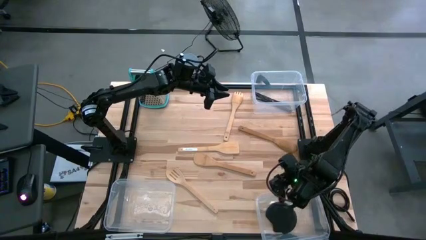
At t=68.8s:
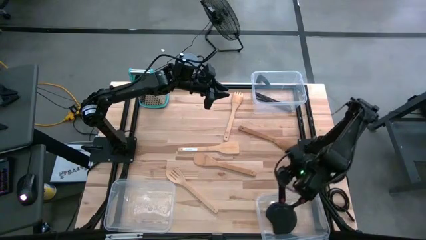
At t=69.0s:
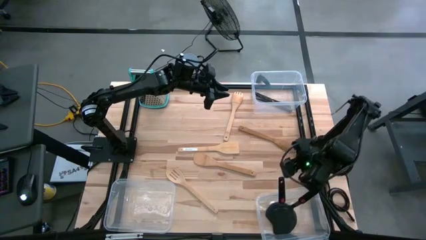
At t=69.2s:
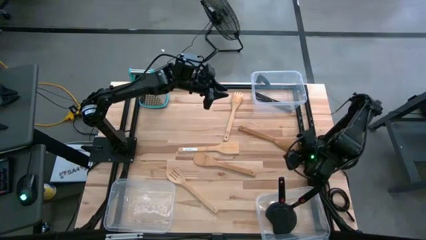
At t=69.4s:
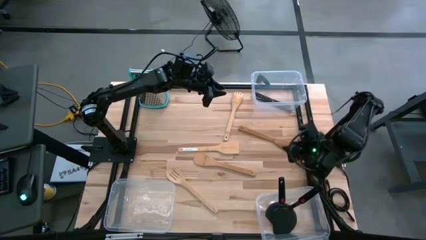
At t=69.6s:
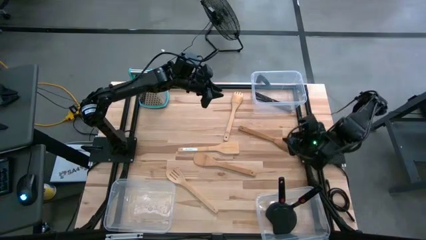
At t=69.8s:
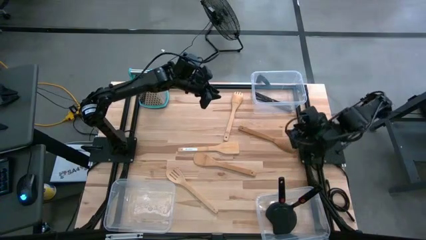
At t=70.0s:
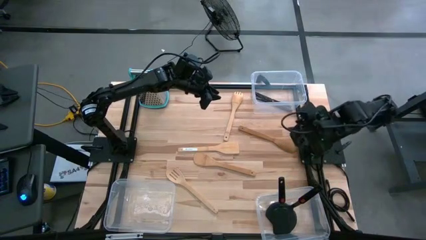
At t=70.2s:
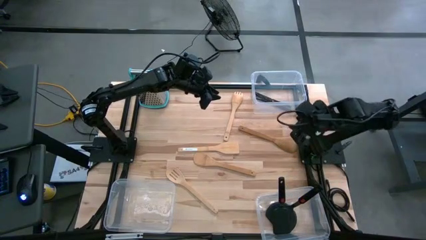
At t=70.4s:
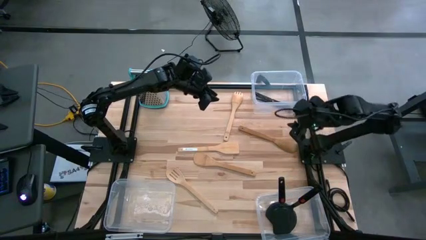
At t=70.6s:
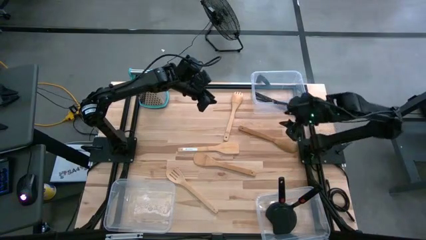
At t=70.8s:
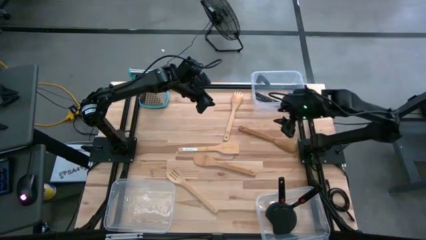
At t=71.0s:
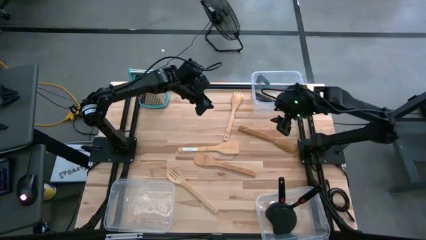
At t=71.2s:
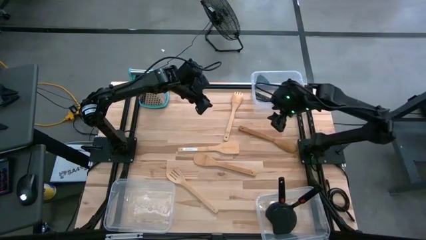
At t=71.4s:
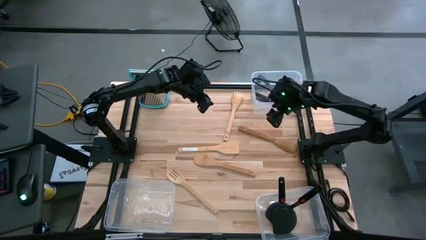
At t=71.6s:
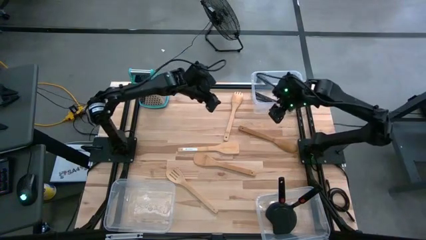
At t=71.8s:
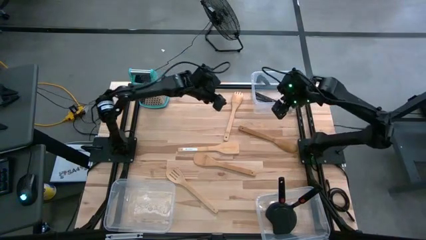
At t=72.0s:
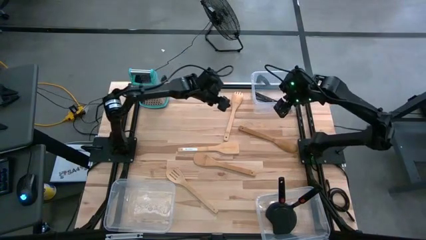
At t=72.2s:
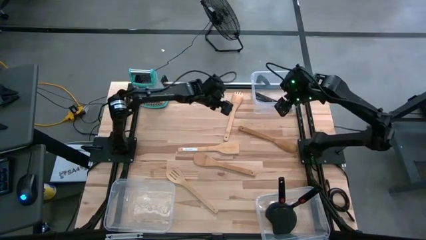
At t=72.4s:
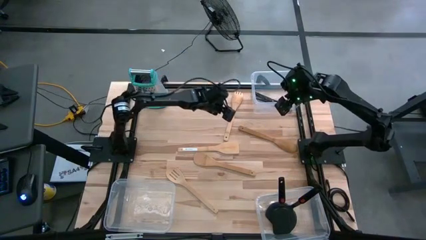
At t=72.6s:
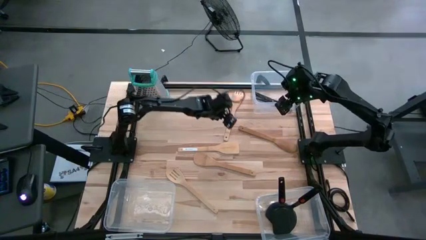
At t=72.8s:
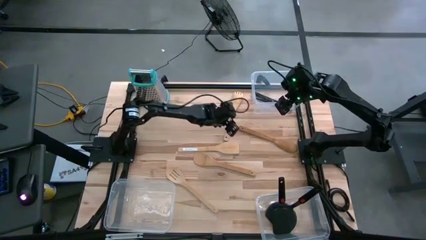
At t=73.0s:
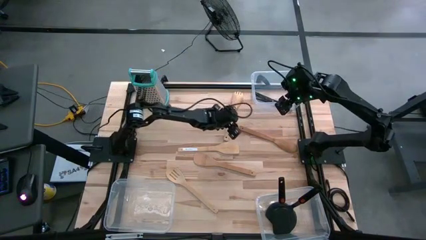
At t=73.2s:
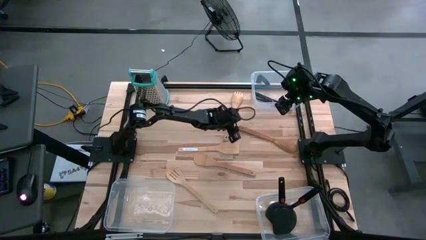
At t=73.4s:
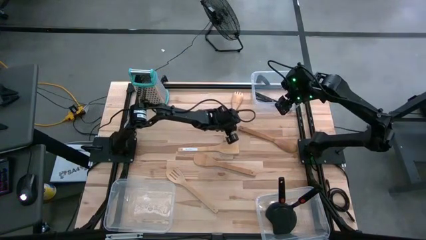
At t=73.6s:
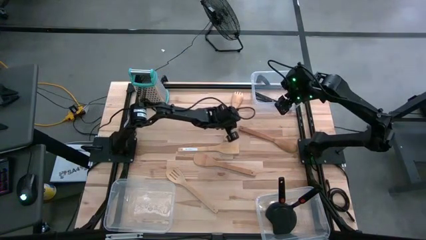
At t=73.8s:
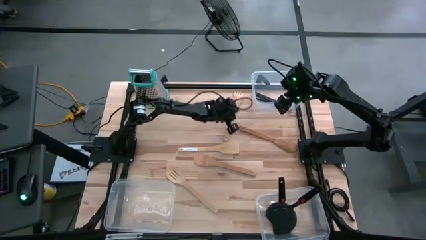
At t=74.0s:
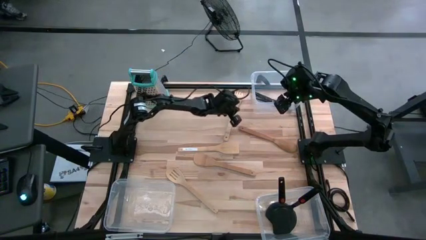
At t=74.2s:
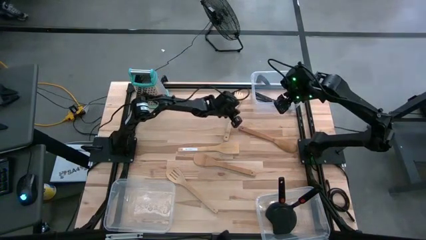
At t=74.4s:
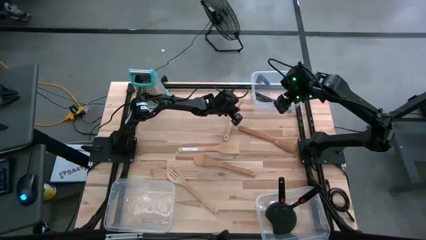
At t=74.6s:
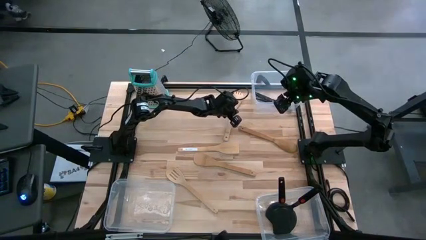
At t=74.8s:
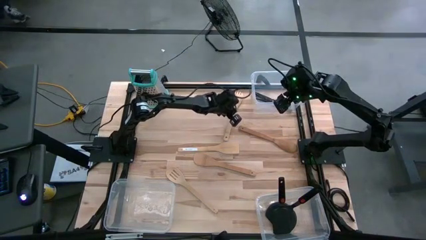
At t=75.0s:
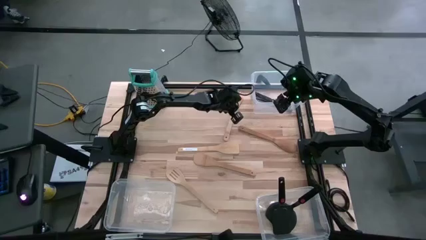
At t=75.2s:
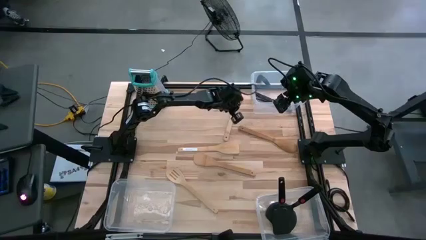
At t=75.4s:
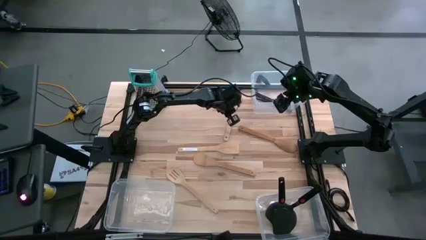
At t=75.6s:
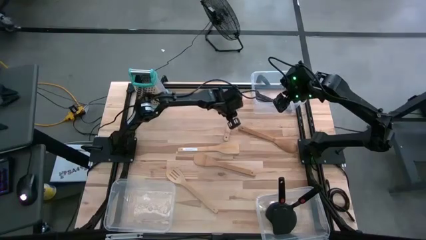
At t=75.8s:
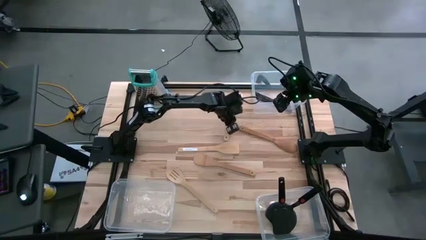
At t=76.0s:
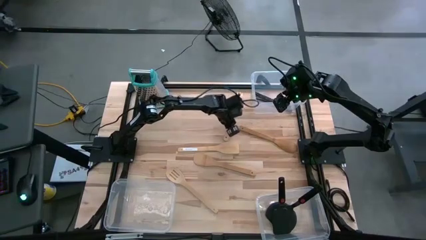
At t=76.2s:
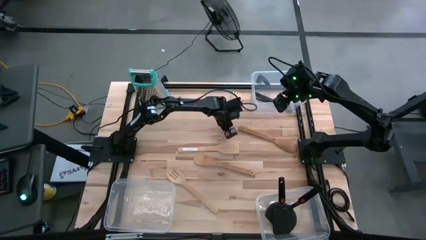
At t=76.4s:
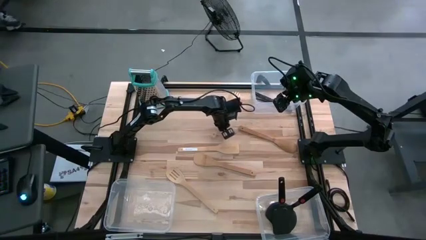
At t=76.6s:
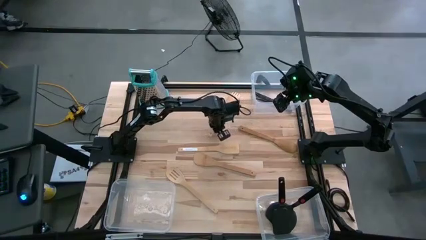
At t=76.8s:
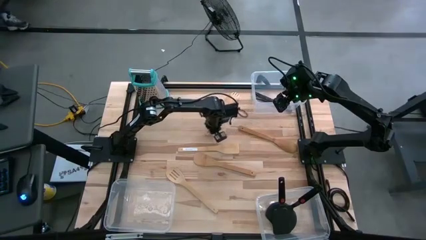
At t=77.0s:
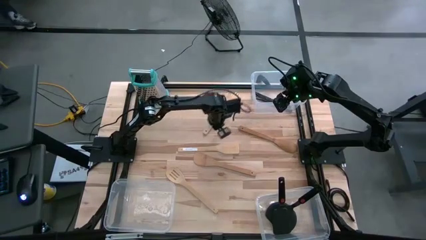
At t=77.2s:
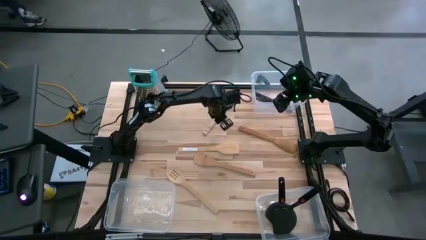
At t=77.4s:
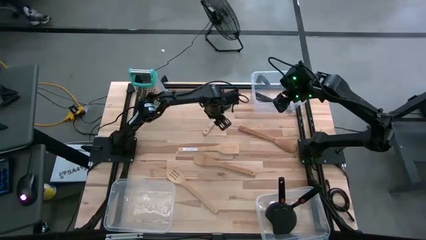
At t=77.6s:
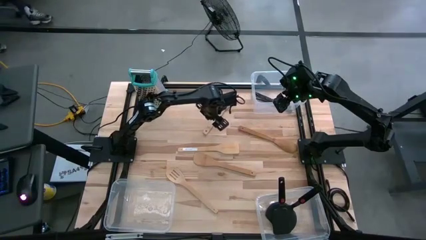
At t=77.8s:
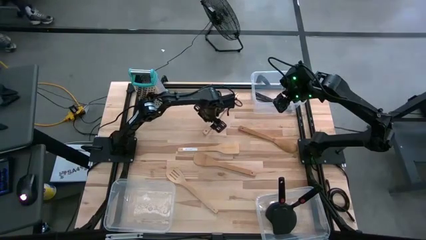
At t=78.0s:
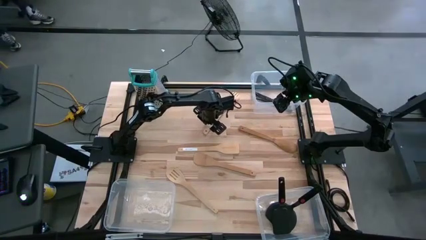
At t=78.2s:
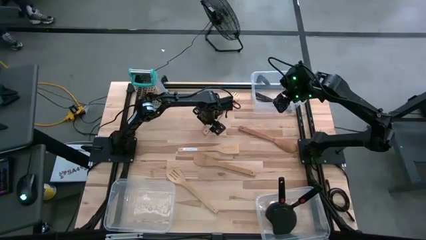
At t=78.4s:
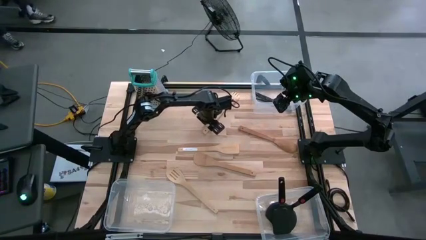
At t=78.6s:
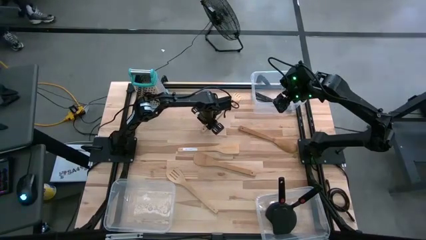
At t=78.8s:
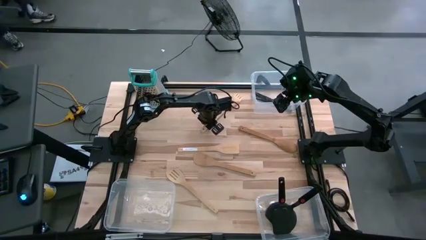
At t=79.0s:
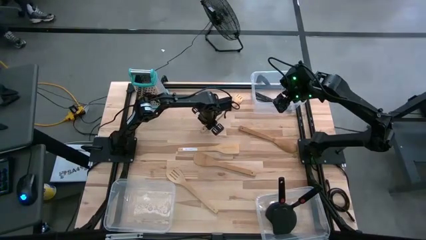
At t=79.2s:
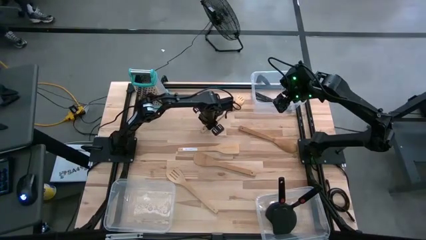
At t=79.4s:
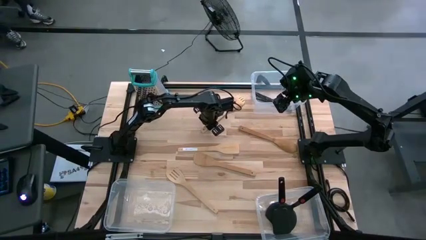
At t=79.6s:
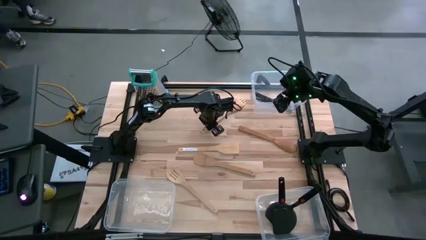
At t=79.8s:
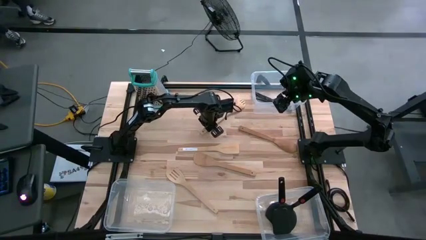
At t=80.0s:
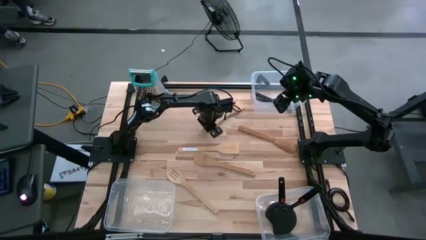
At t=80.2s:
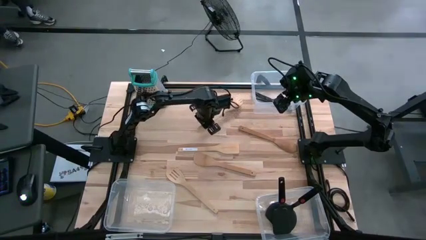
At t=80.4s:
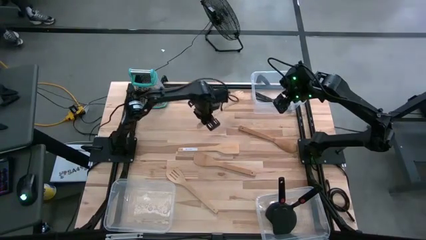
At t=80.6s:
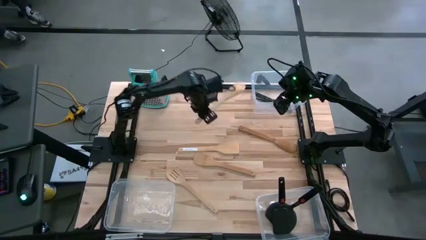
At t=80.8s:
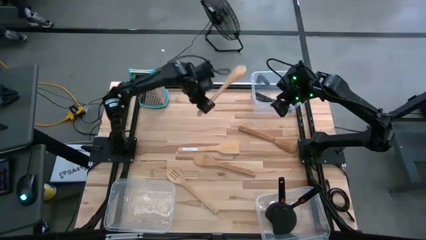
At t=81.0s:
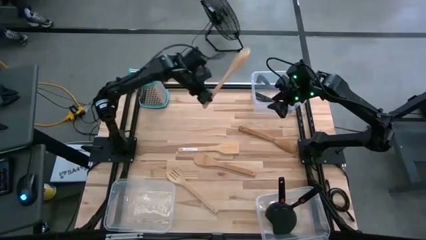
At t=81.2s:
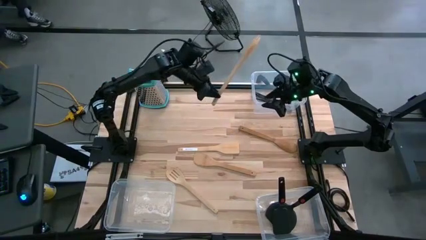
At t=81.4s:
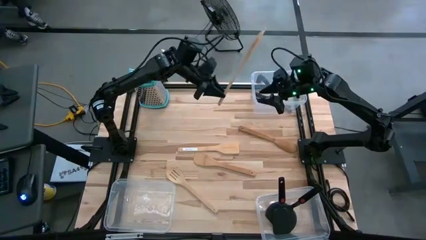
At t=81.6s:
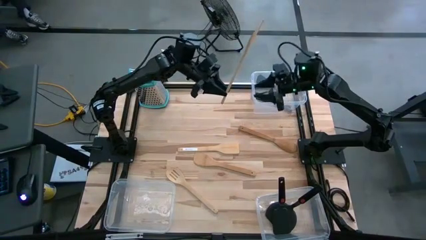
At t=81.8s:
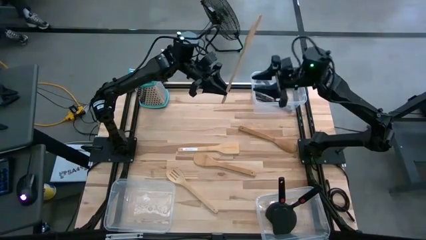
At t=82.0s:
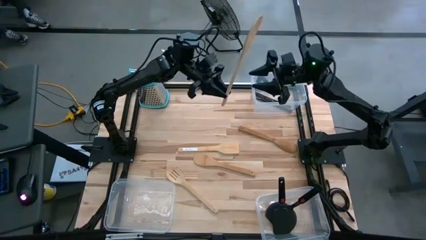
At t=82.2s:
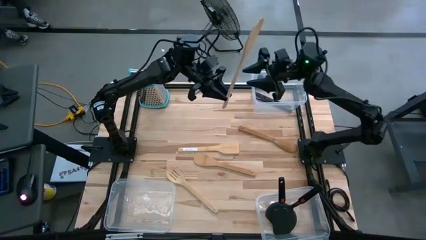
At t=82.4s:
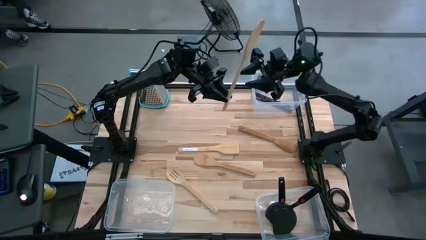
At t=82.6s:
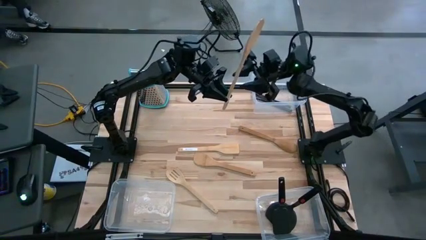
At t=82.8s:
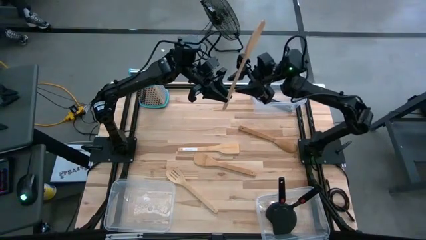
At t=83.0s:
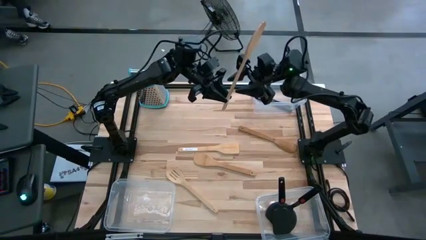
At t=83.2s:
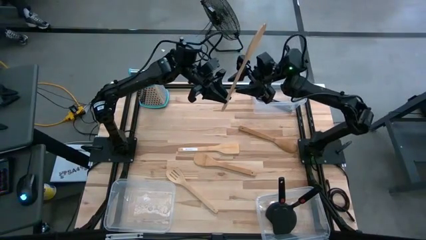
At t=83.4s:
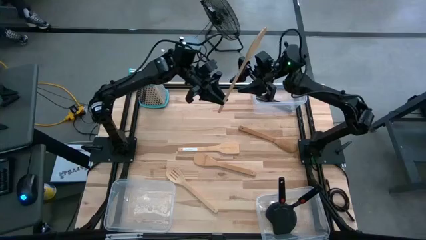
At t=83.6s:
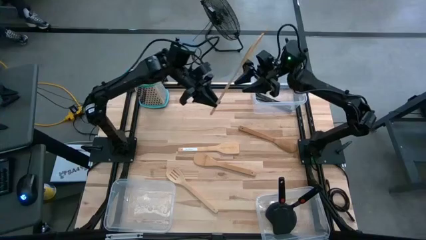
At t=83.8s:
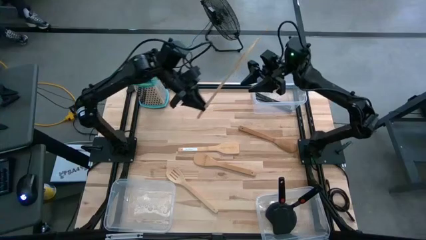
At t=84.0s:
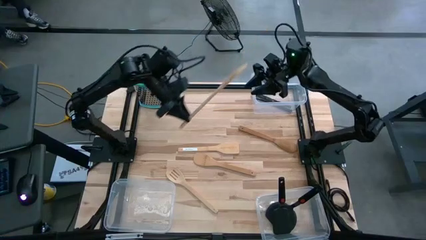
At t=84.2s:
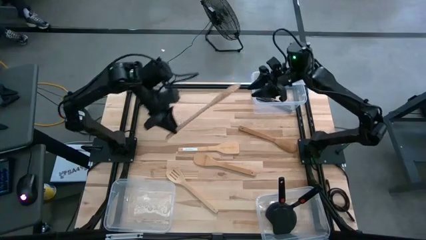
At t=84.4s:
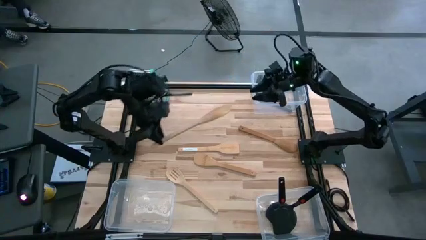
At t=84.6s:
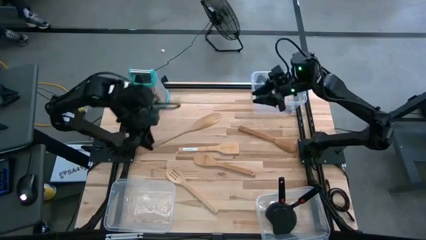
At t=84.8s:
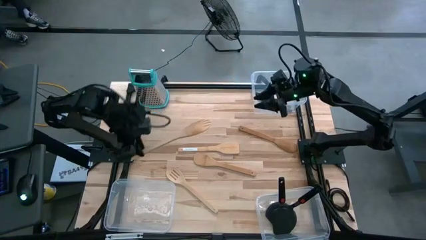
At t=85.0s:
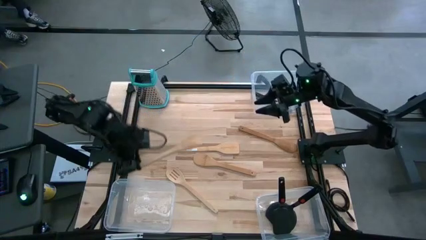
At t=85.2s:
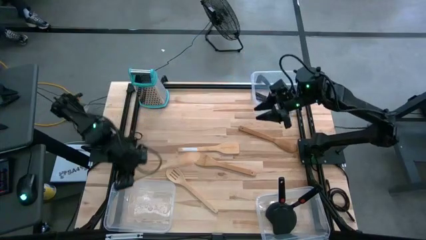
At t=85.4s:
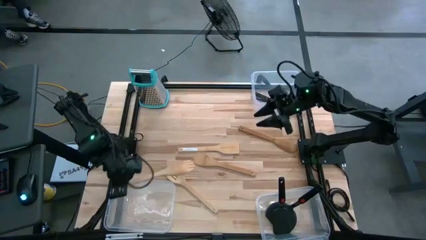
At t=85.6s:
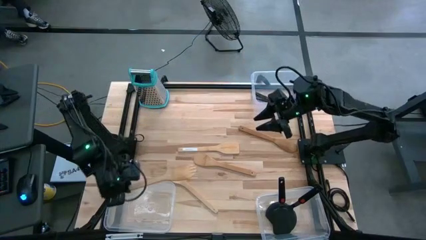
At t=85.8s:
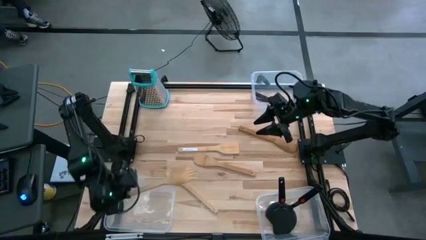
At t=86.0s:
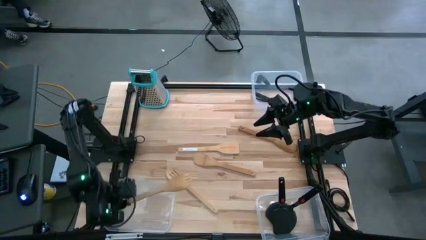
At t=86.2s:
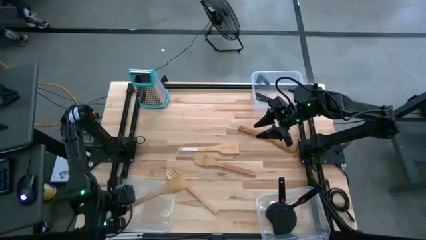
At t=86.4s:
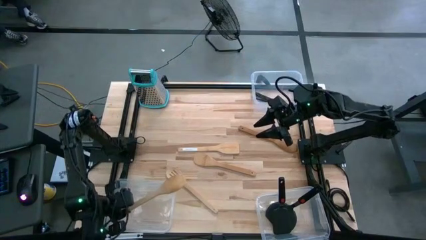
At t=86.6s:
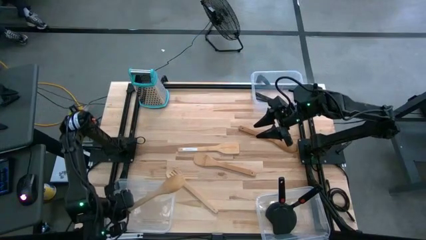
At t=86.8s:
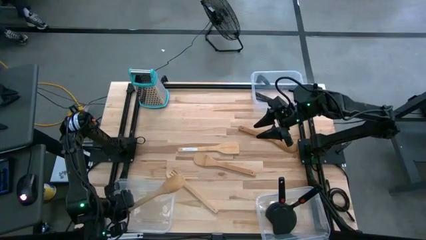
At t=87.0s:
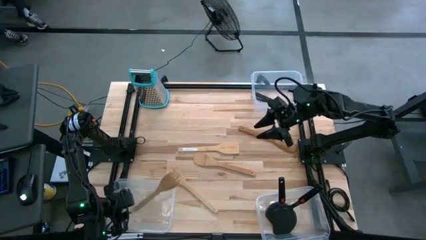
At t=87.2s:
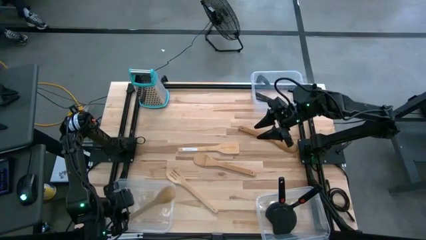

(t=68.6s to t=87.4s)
Task: Pick & Place Kitchen Items
Put the light brown serving fork into the bottom left transparent bin
